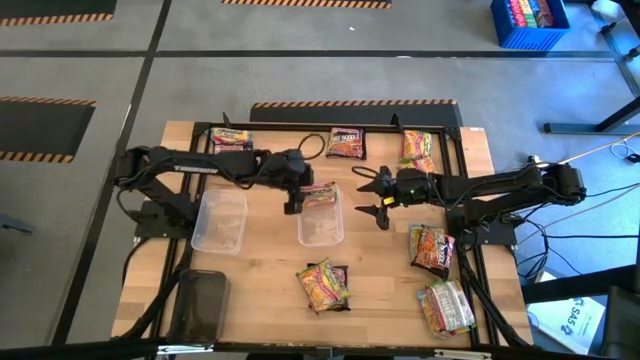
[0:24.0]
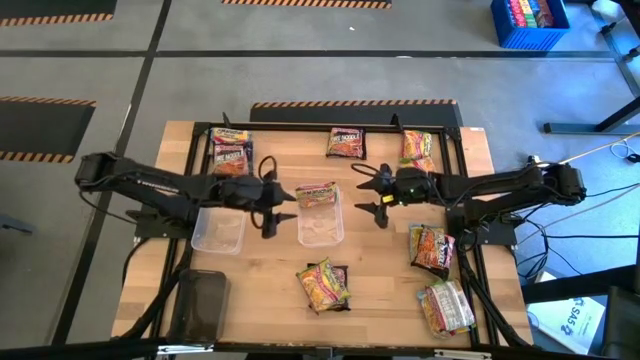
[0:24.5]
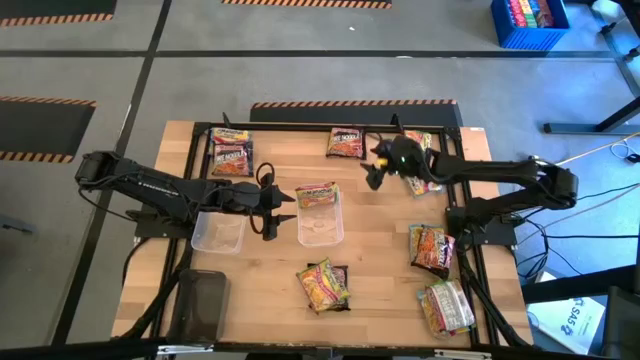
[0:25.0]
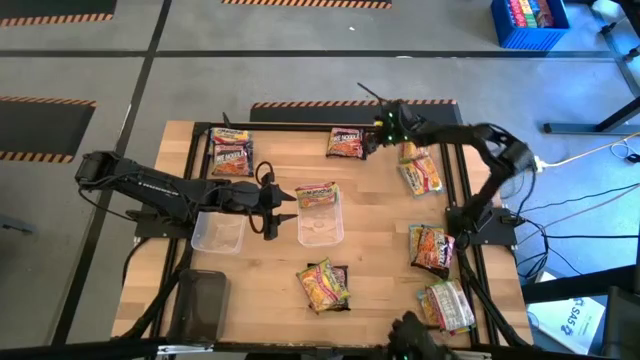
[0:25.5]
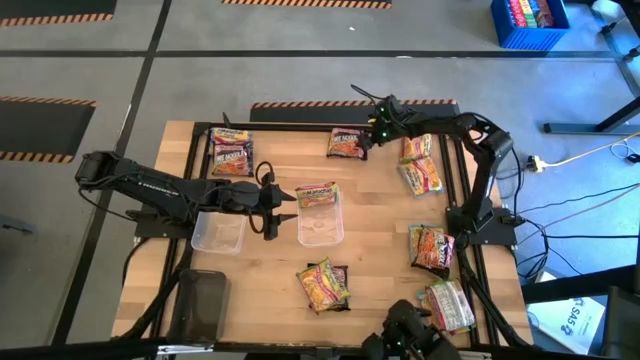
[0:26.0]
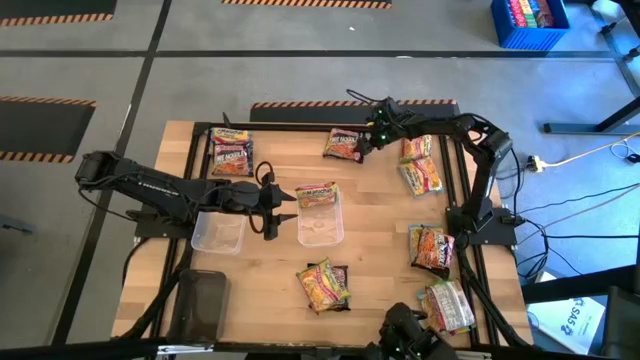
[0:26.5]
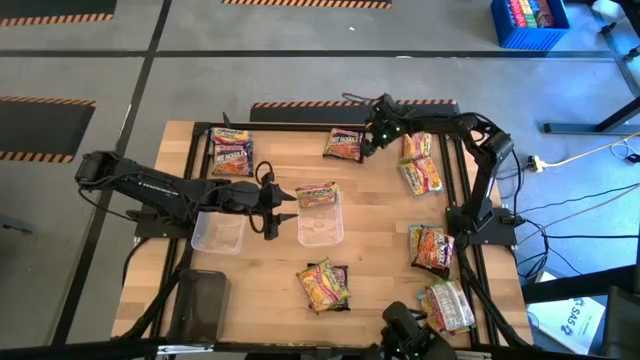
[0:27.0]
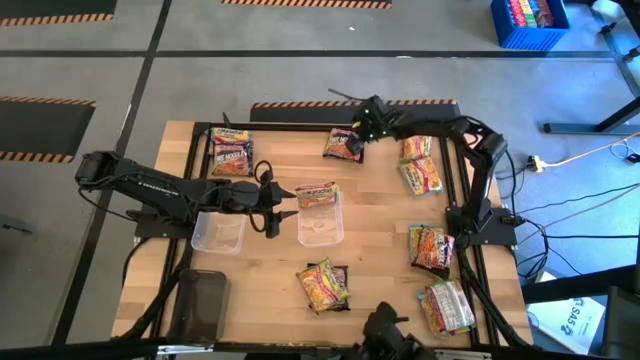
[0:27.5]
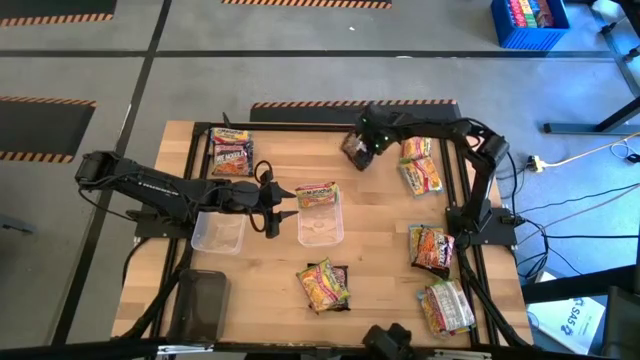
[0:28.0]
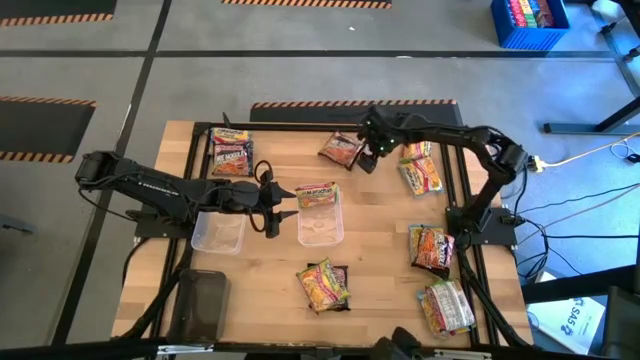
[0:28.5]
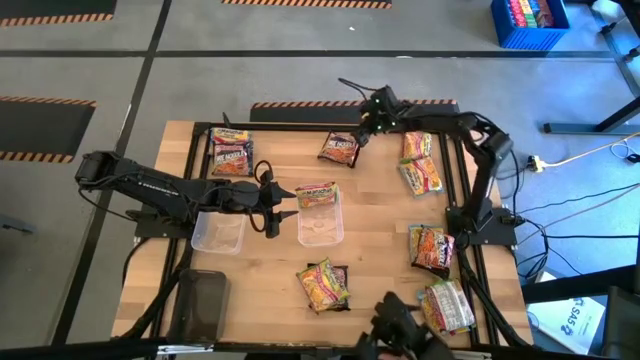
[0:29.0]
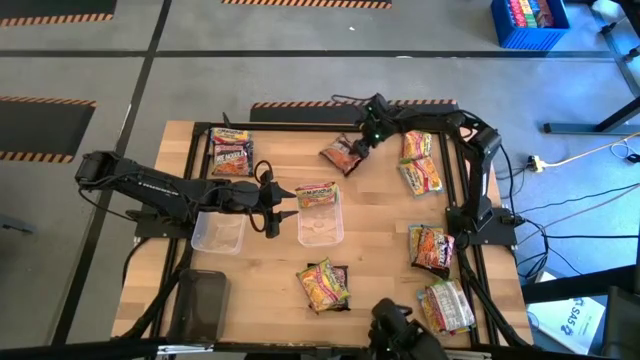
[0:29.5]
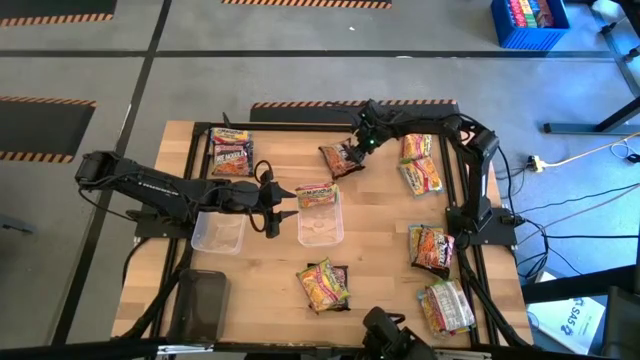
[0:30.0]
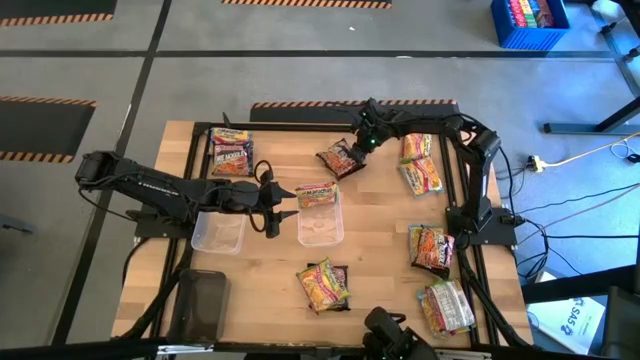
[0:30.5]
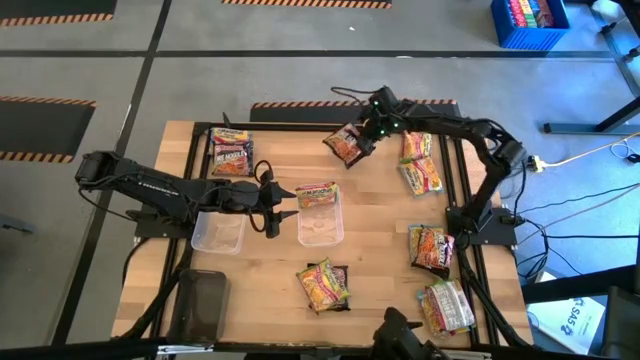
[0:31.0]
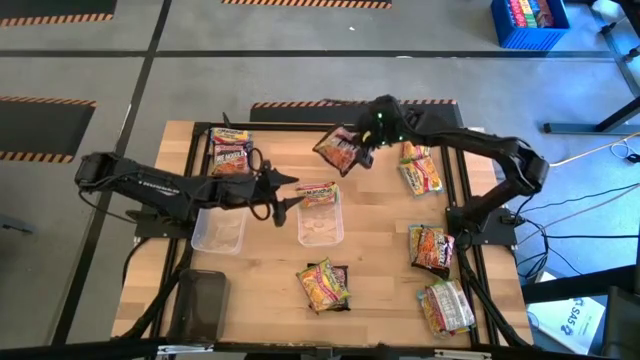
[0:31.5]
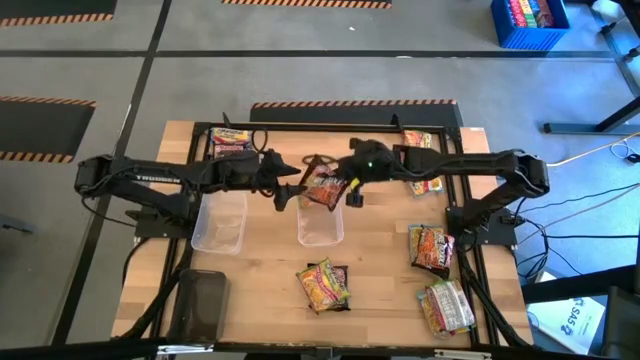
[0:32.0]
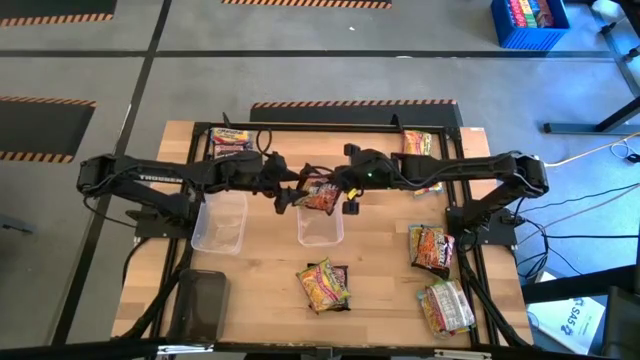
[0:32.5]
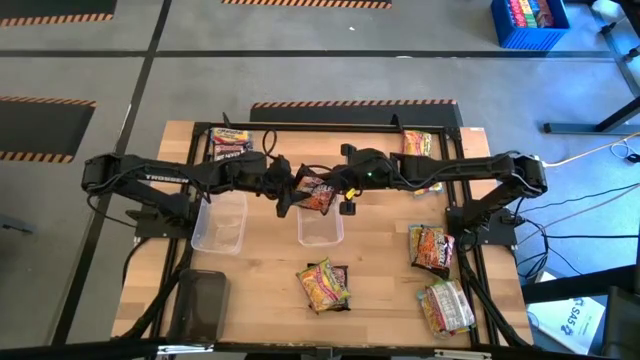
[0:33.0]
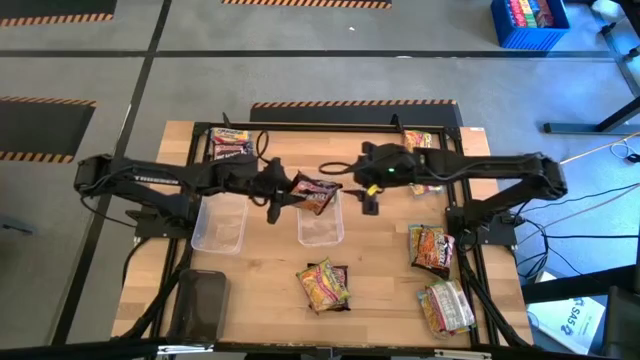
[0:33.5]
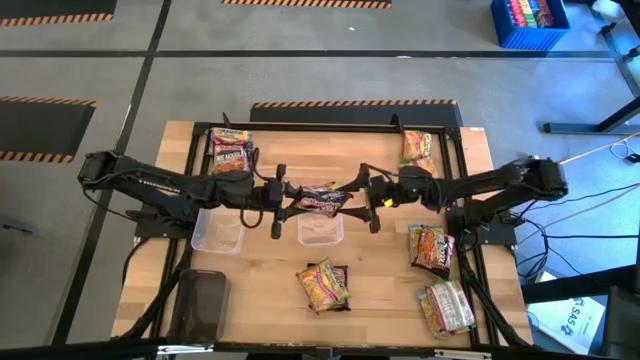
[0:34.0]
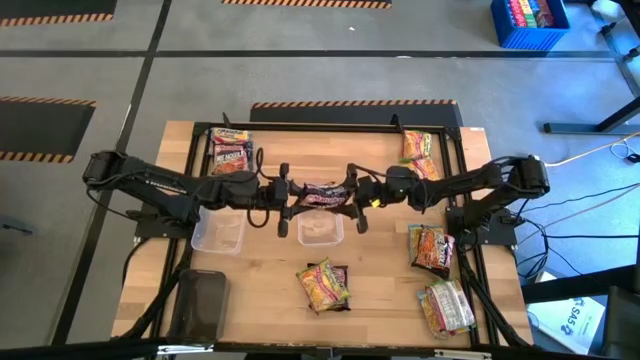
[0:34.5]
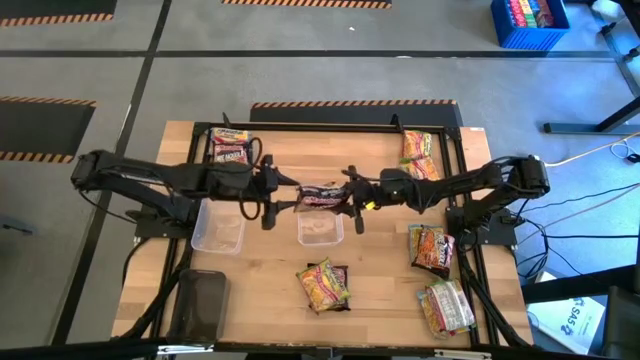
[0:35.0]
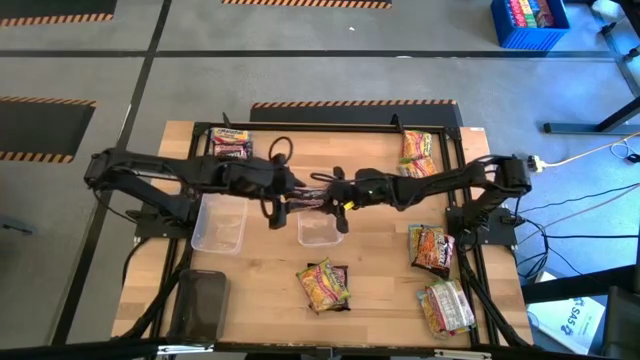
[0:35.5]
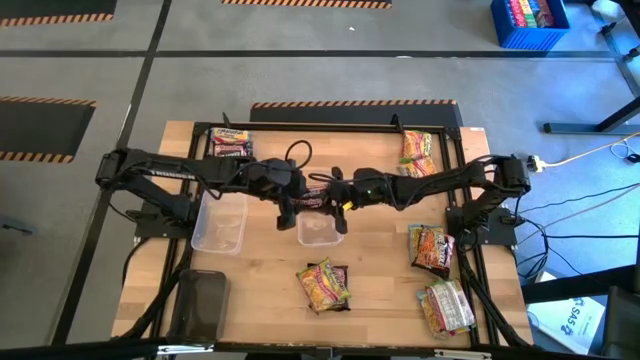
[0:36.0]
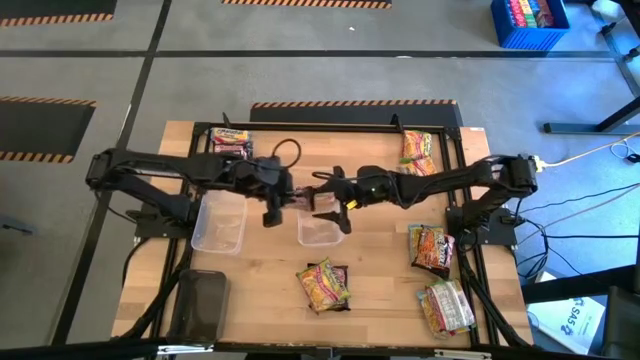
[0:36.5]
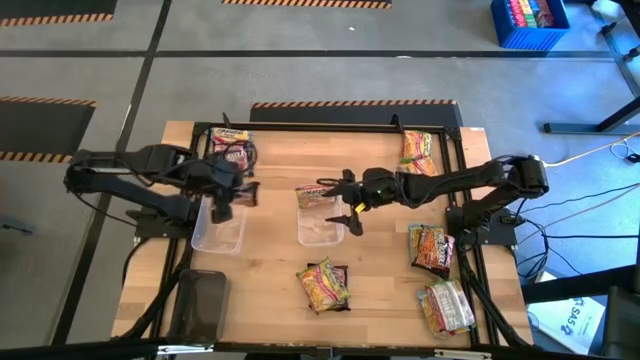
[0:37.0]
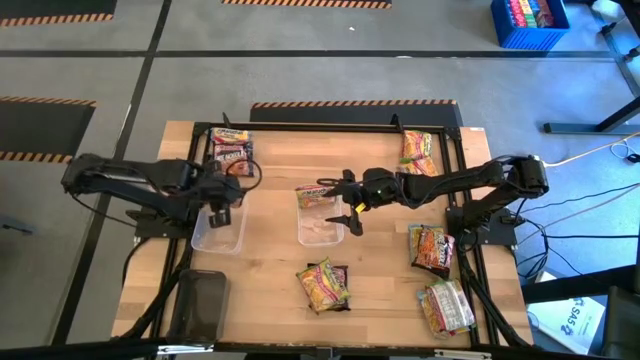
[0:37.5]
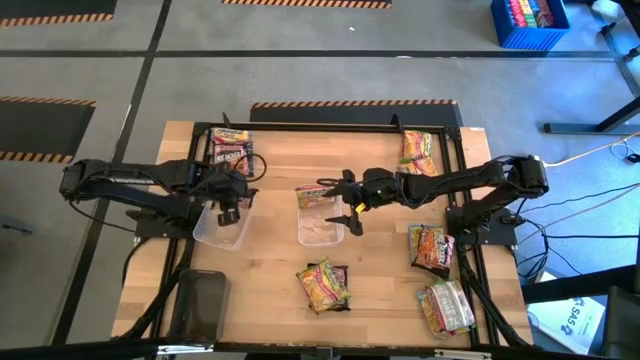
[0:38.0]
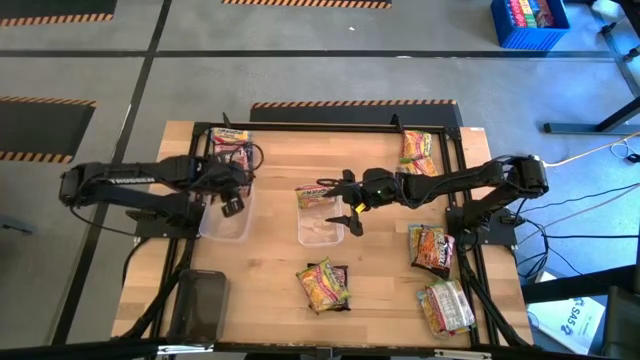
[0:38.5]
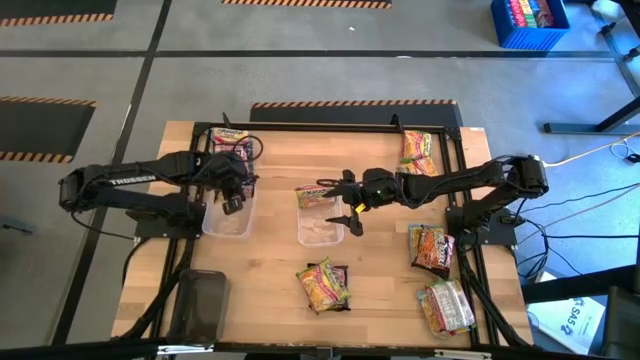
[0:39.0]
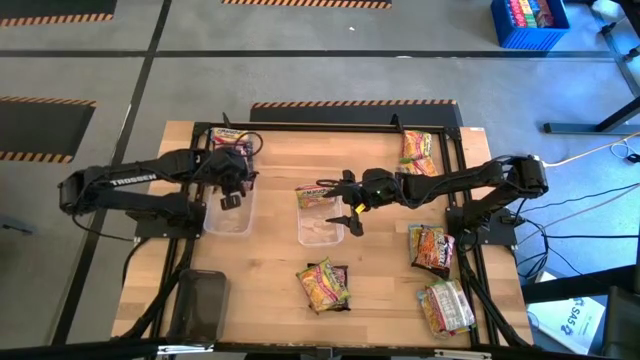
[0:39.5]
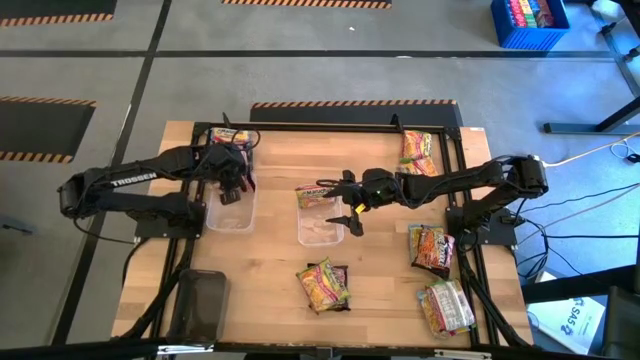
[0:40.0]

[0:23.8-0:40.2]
Task: Sort Maruchan noodles
Put the black noodle pack into the left transparent bin
